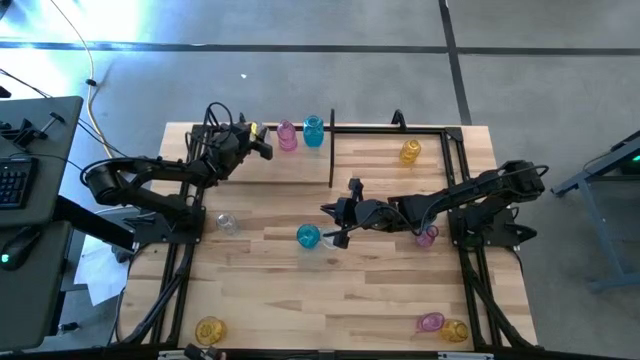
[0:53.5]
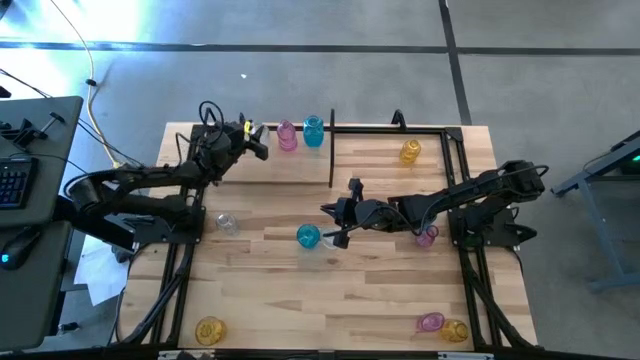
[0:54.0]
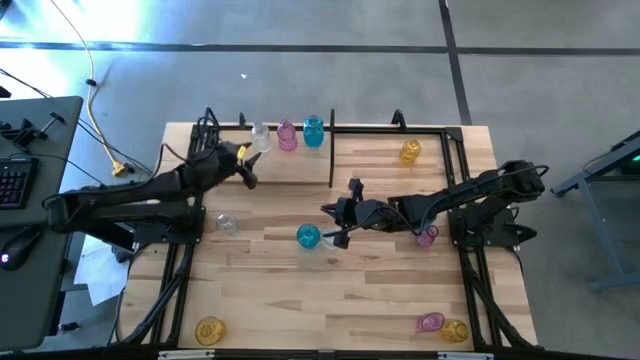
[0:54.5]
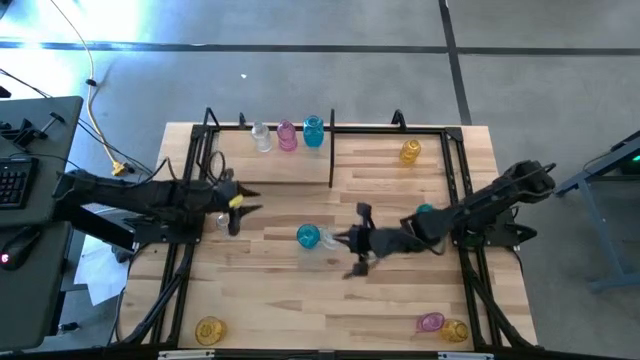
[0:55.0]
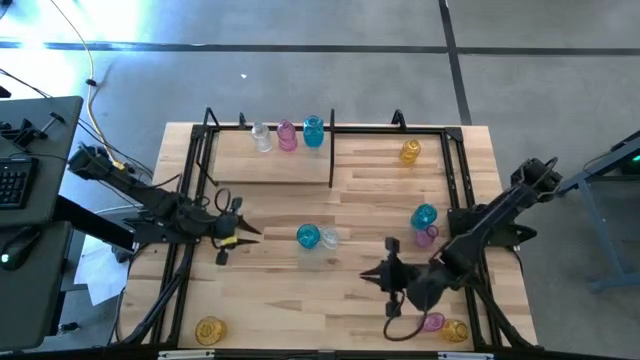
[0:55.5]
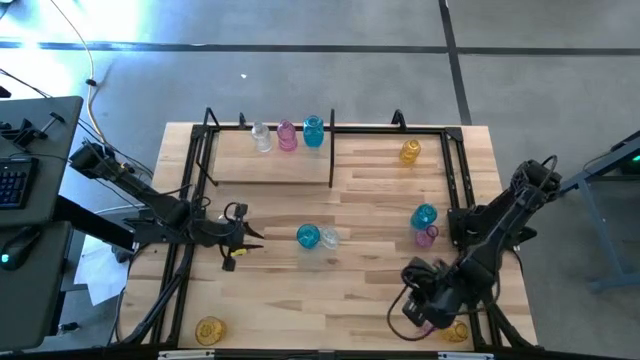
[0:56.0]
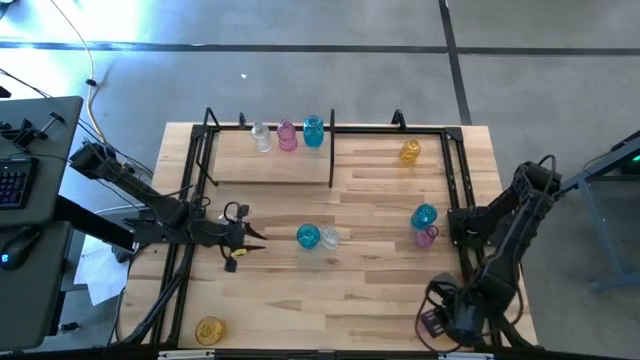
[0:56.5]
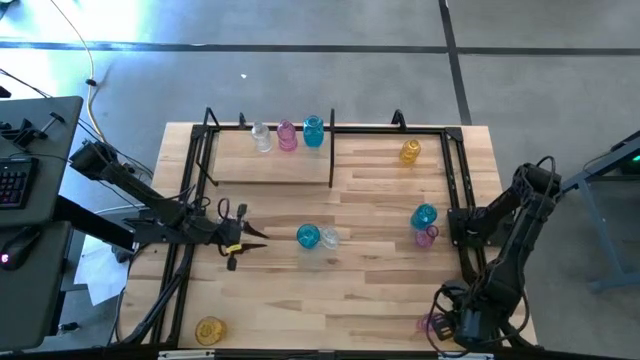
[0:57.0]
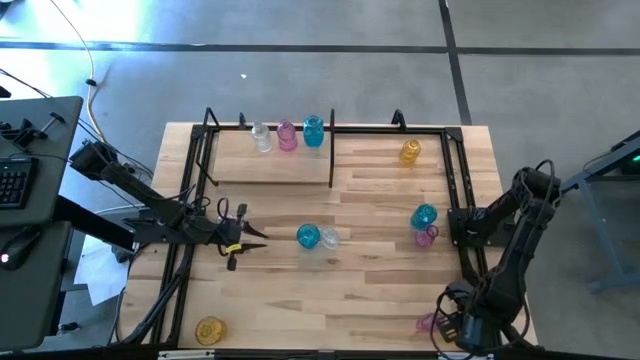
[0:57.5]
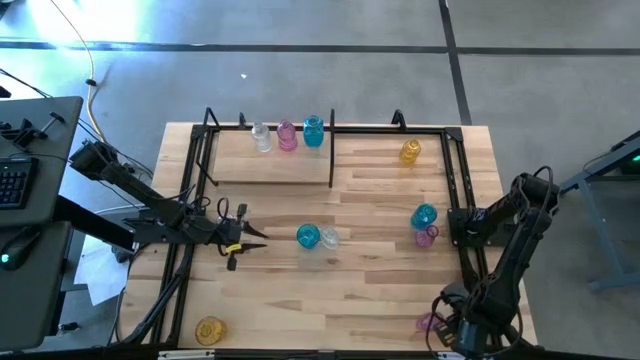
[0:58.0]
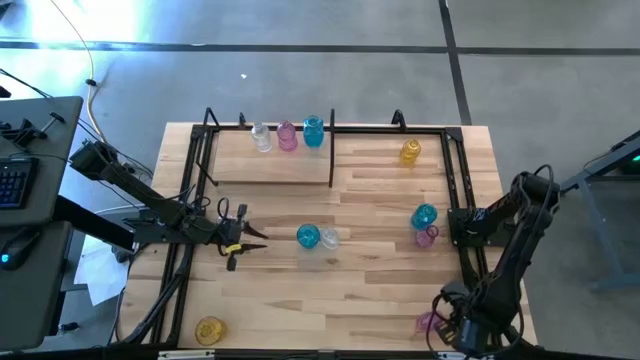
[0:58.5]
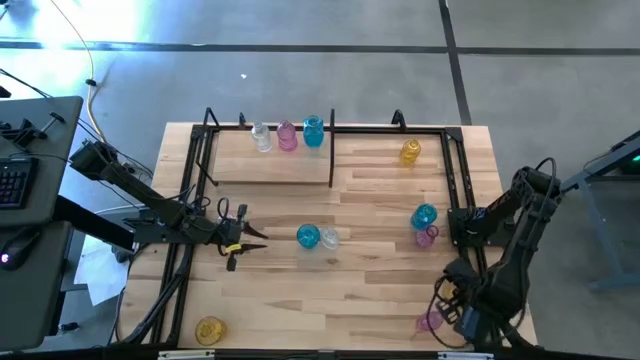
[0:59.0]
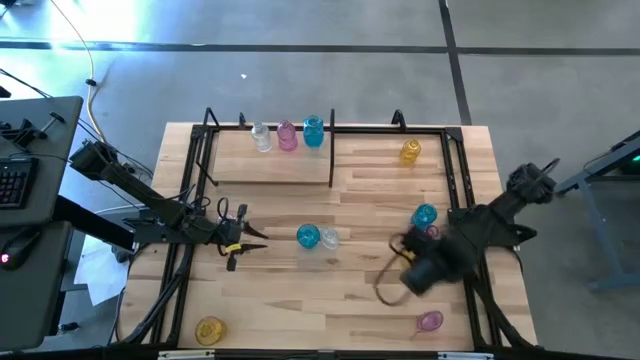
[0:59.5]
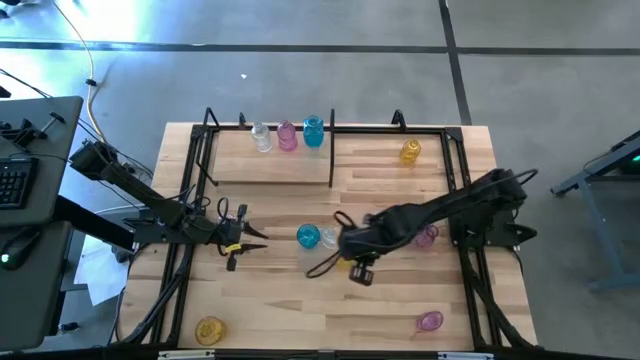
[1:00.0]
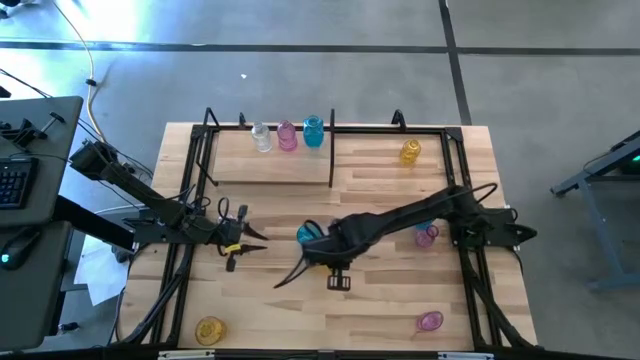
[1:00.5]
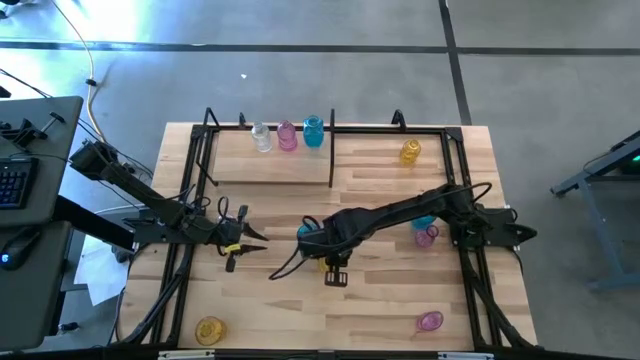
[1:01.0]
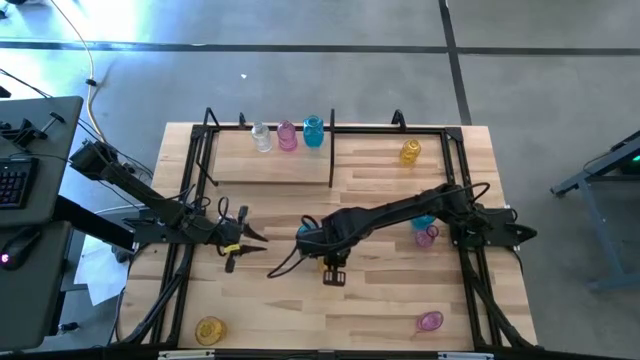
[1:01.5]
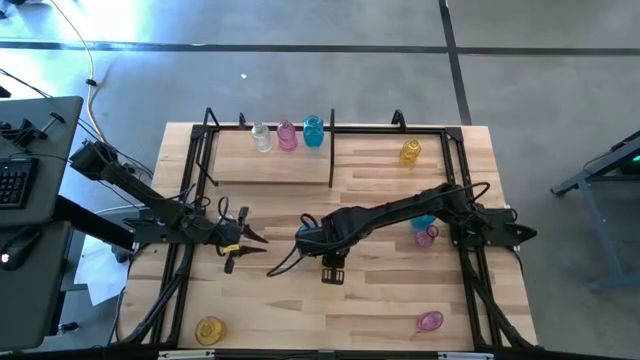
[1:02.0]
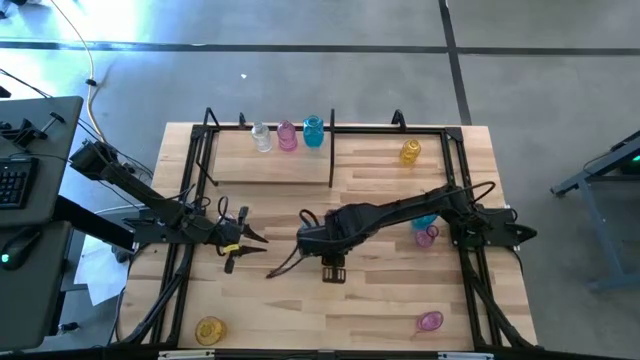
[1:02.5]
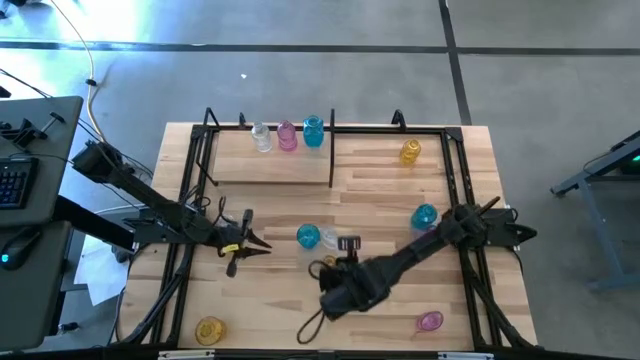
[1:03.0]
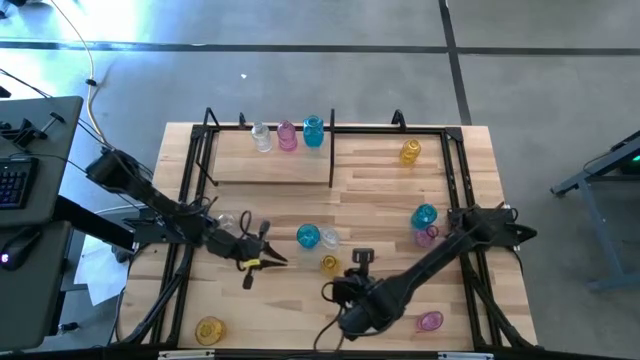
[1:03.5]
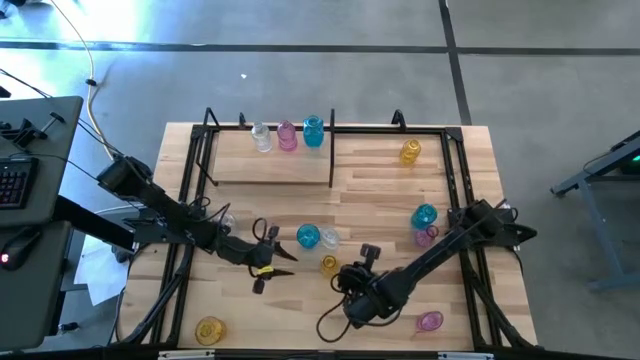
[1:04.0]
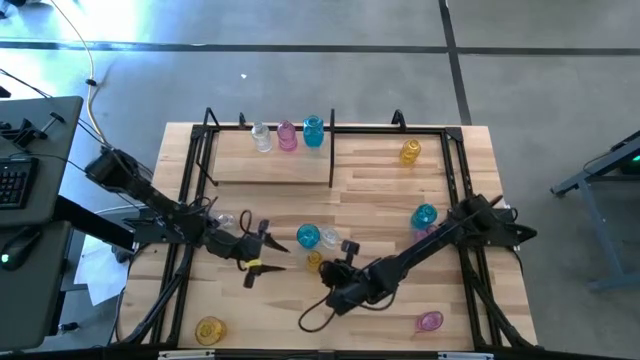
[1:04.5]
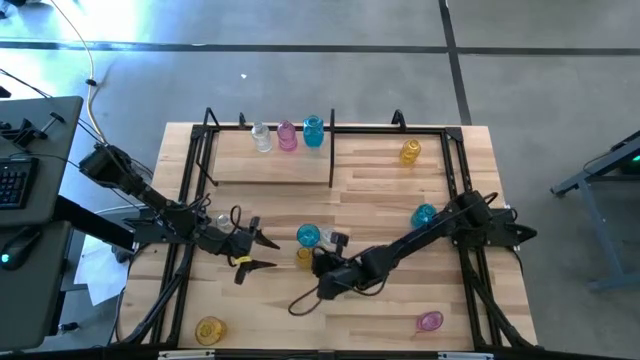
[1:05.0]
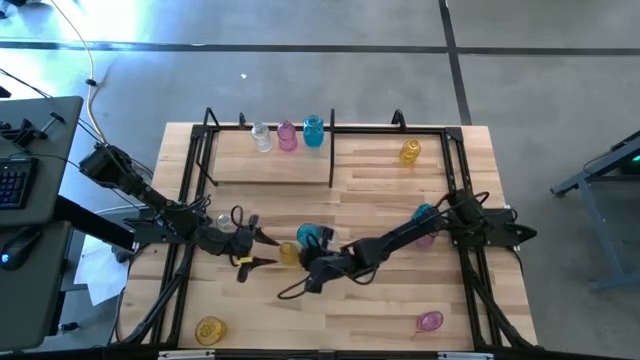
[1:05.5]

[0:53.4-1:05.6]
Task: sort vases onto shelf
Put the bottom right yellow flower vase on the shelf

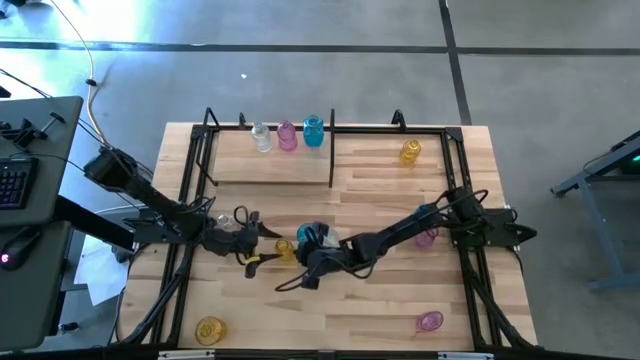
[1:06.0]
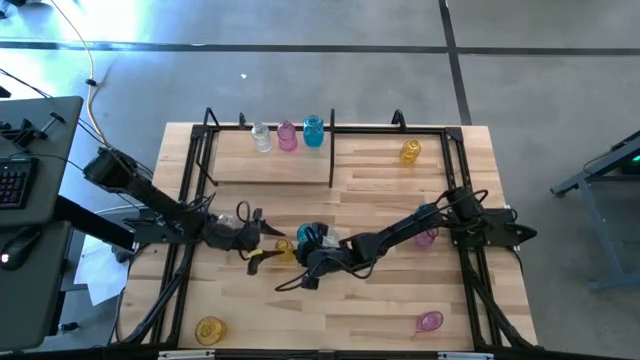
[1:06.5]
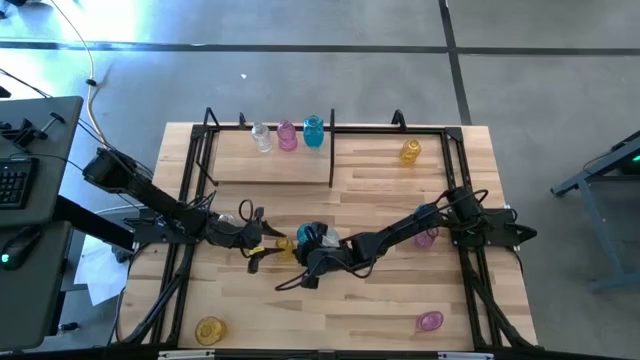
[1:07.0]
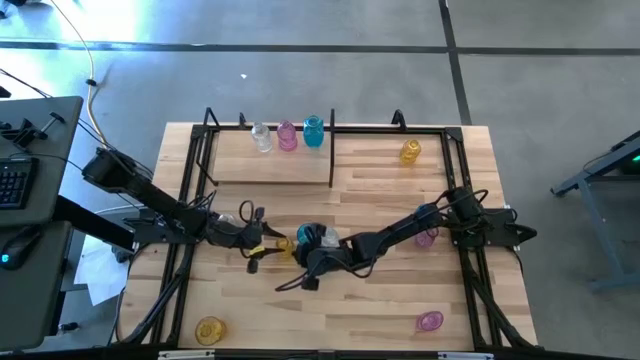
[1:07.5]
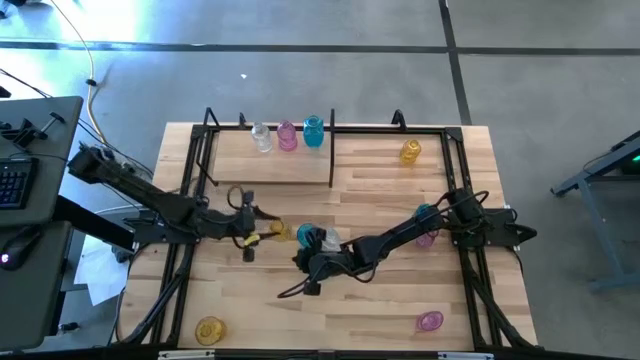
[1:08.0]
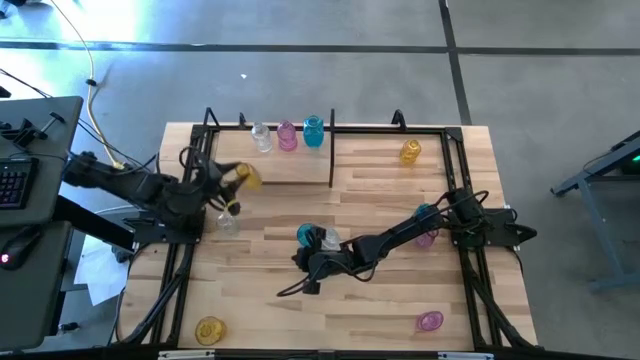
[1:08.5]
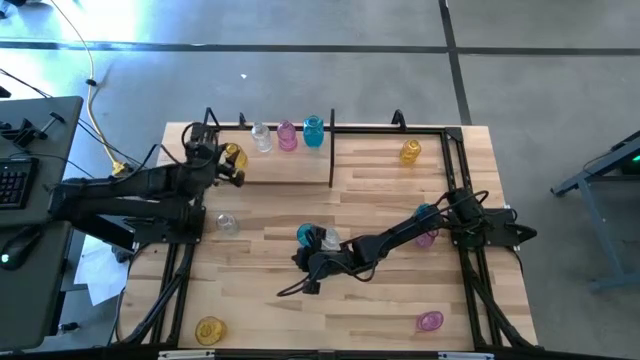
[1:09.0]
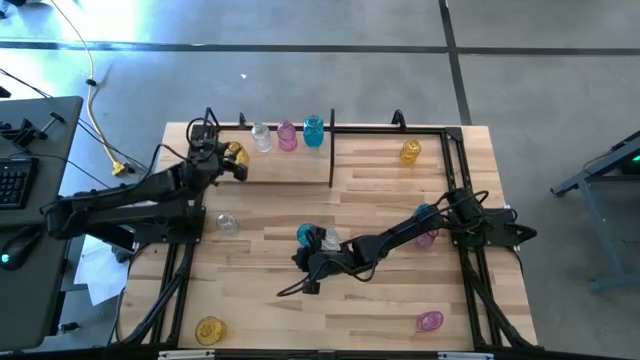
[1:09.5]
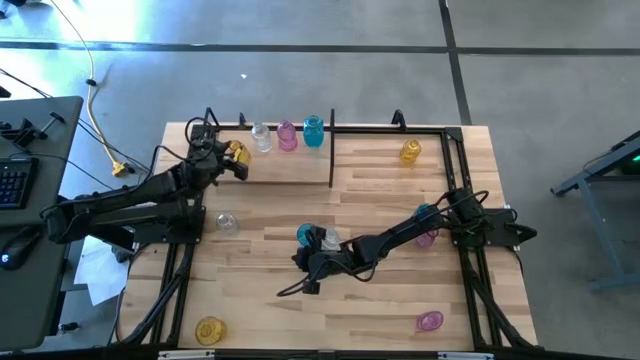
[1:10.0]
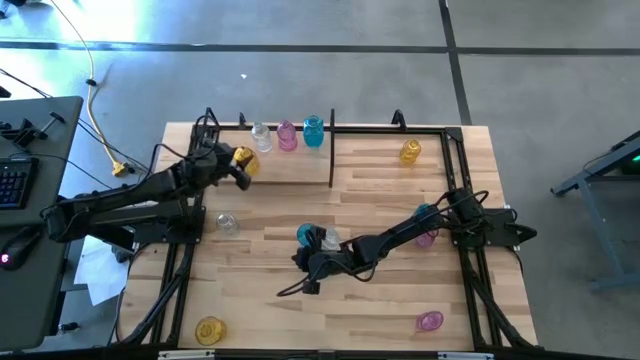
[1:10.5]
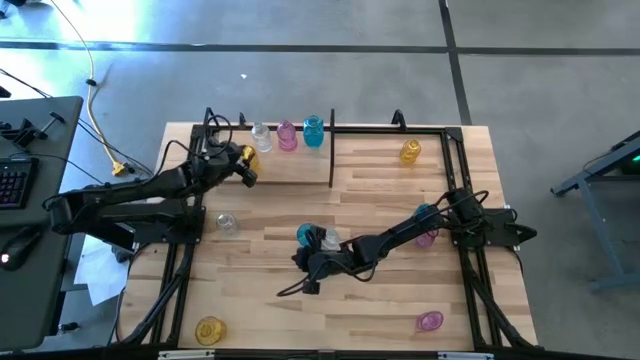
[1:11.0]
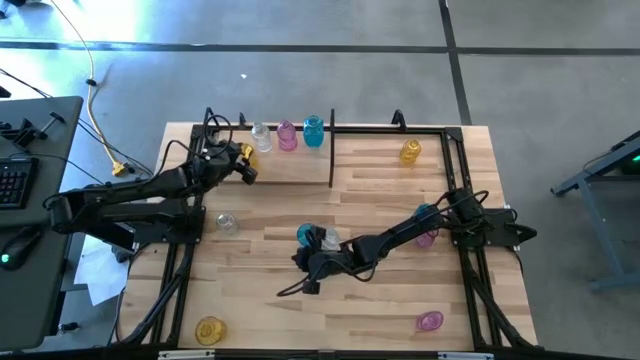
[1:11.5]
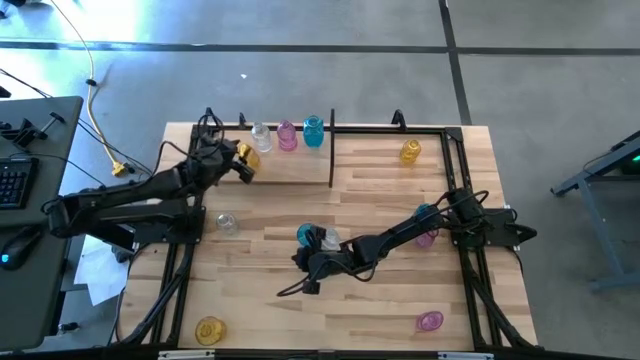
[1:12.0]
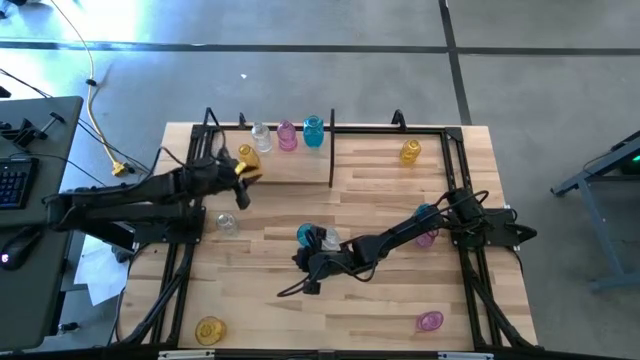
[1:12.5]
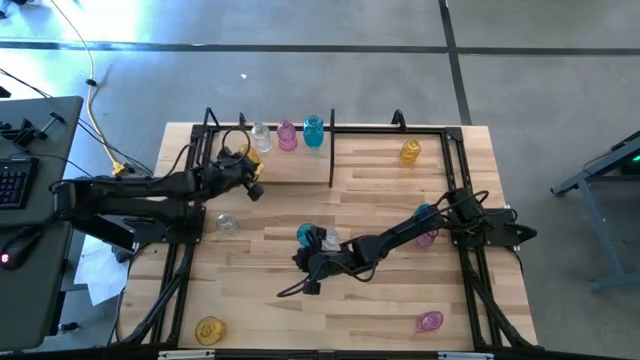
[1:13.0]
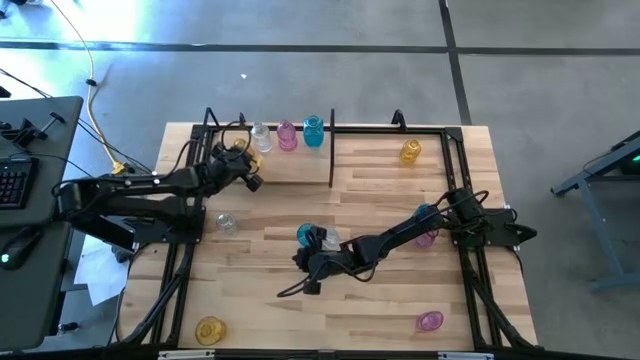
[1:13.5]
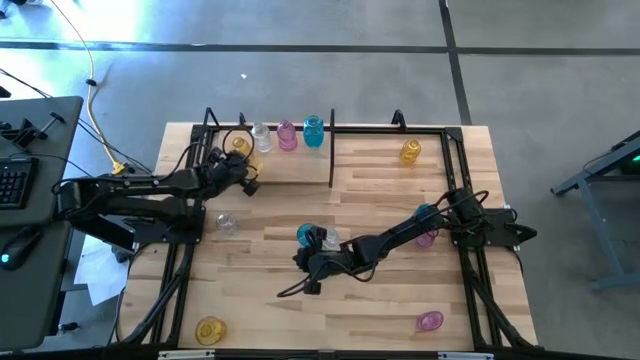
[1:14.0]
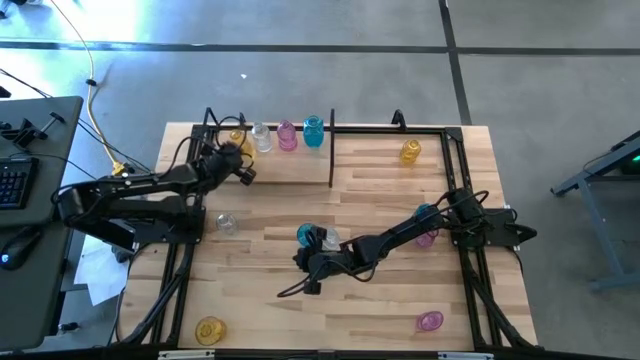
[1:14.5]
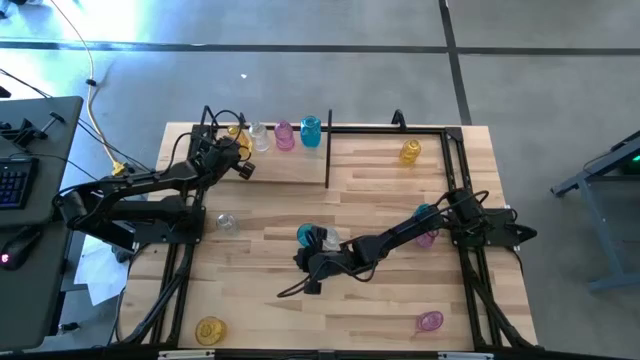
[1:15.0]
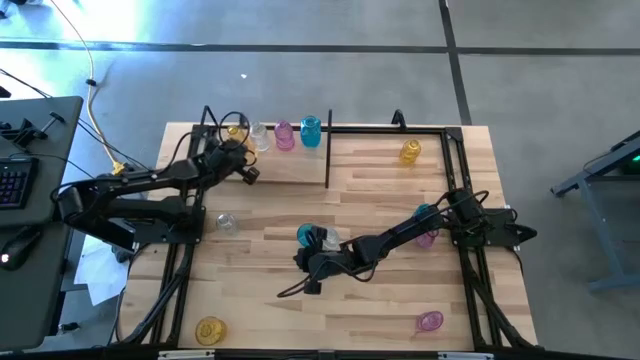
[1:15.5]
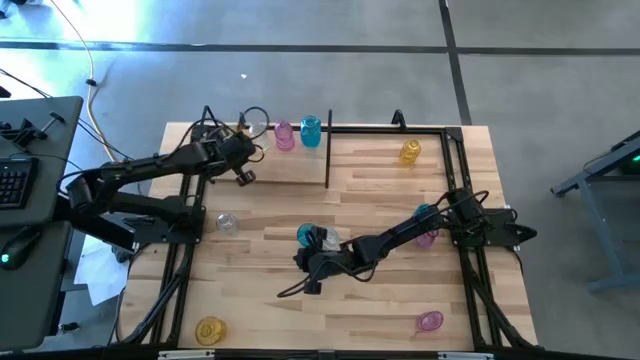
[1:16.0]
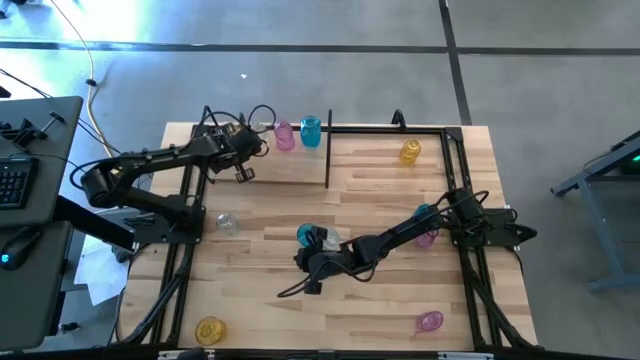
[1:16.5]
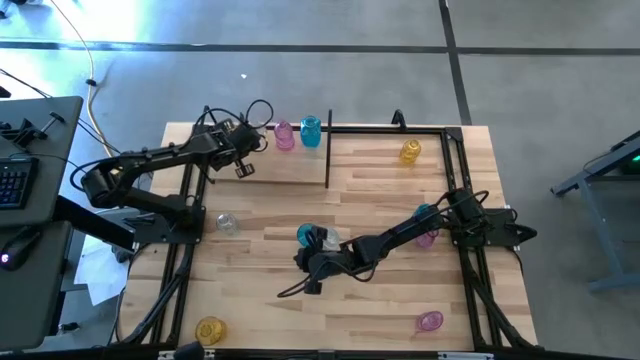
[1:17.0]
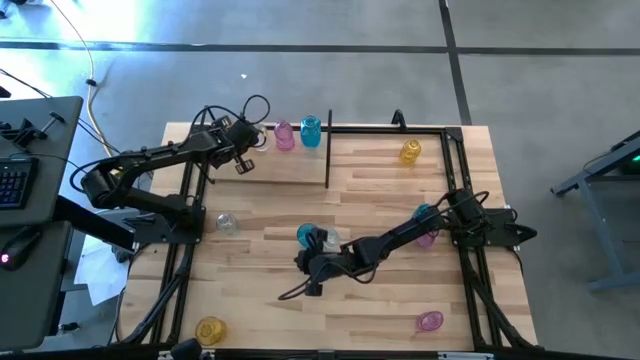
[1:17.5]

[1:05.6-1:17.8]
Put the bottom right yellow flower vase on the shelf
